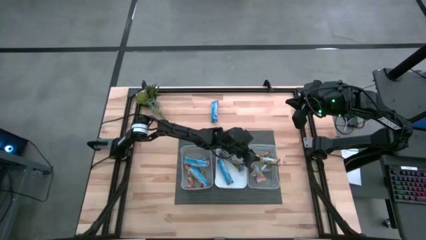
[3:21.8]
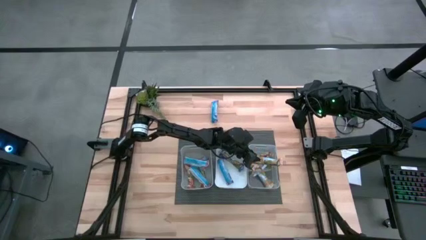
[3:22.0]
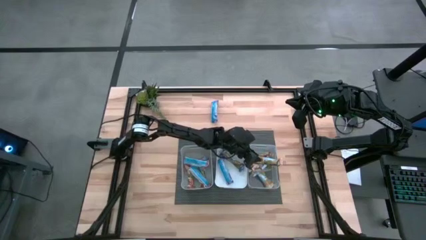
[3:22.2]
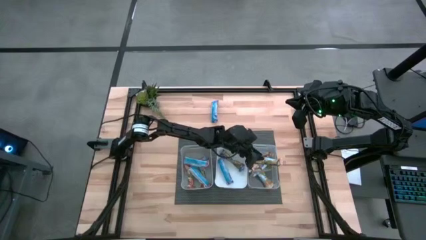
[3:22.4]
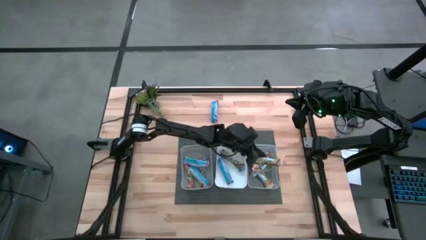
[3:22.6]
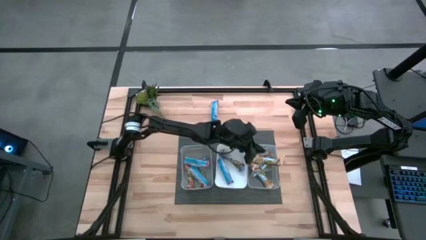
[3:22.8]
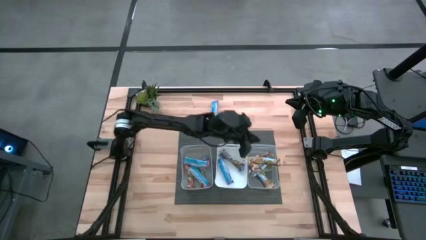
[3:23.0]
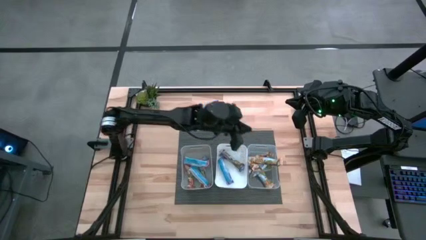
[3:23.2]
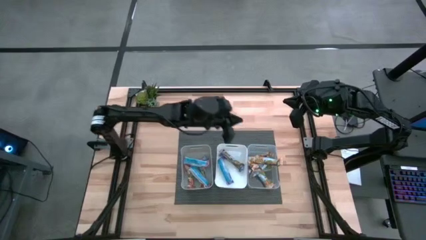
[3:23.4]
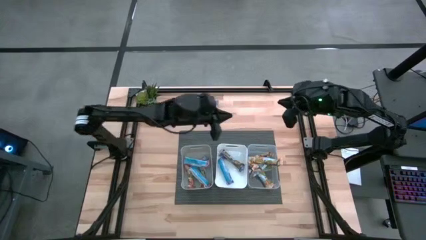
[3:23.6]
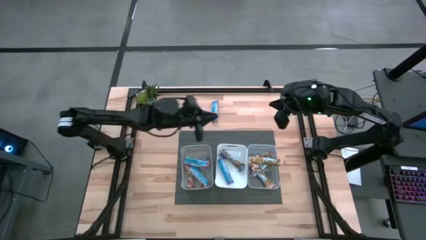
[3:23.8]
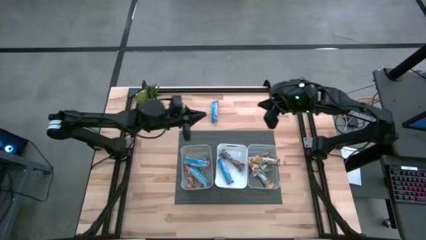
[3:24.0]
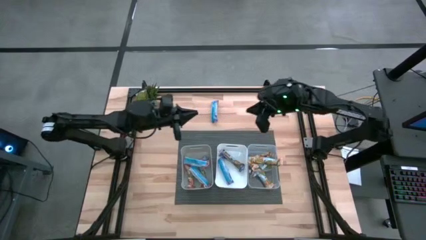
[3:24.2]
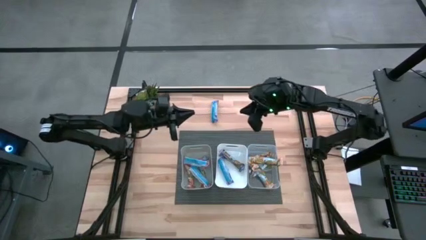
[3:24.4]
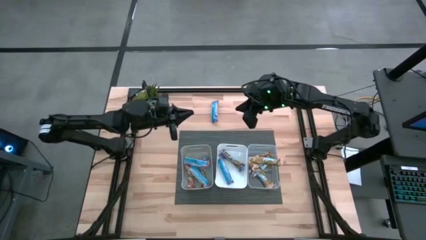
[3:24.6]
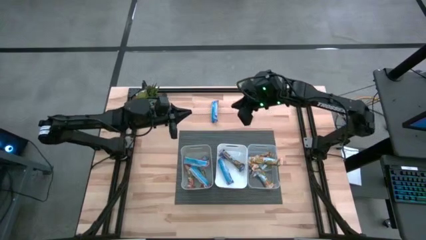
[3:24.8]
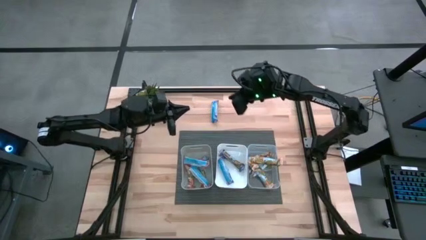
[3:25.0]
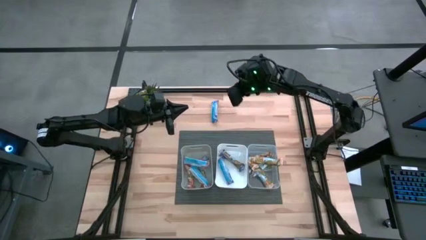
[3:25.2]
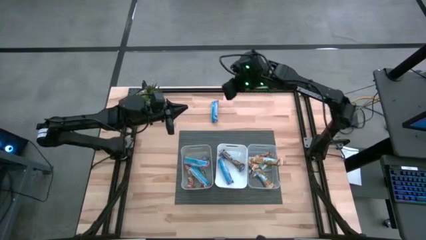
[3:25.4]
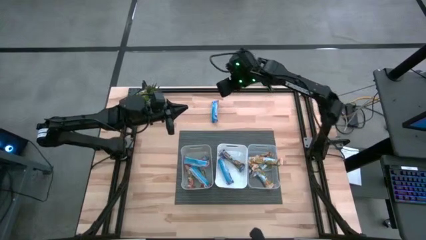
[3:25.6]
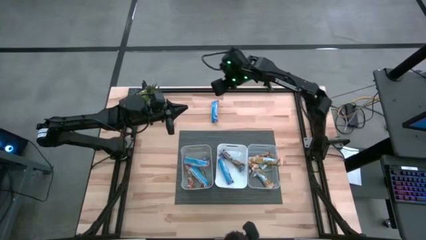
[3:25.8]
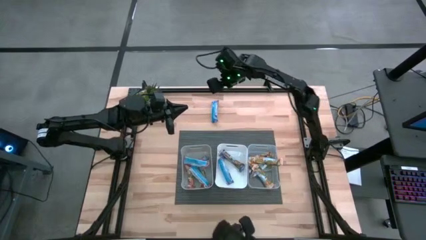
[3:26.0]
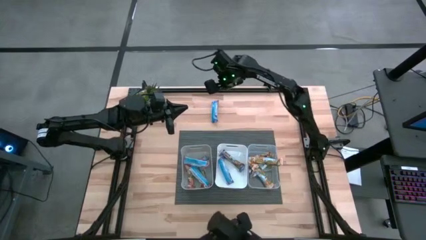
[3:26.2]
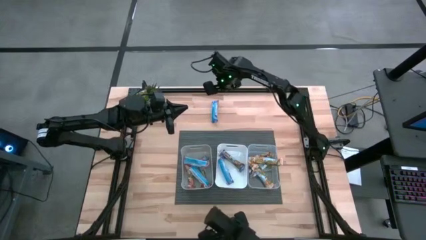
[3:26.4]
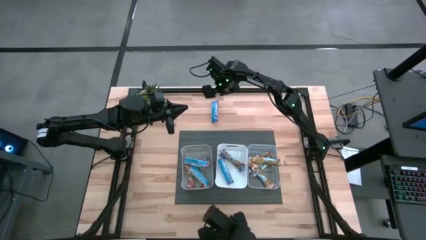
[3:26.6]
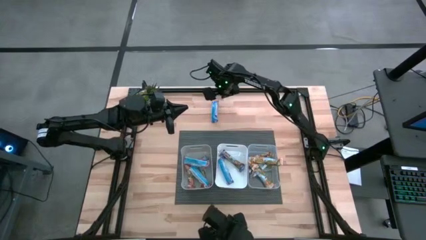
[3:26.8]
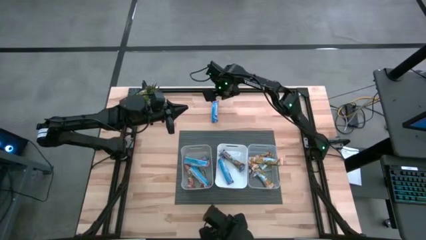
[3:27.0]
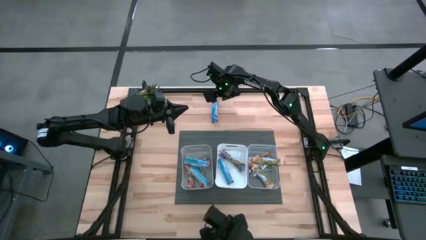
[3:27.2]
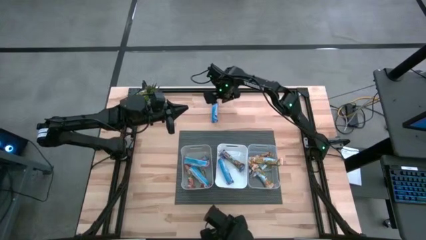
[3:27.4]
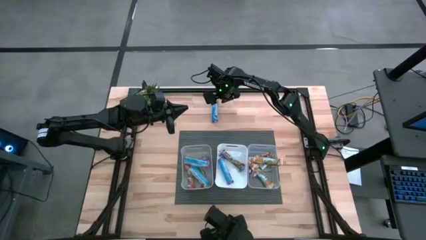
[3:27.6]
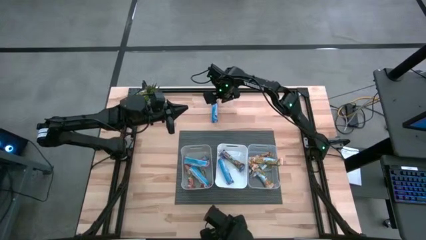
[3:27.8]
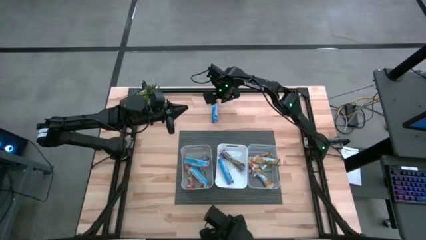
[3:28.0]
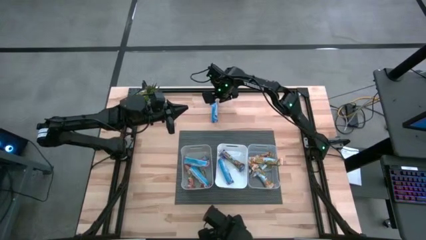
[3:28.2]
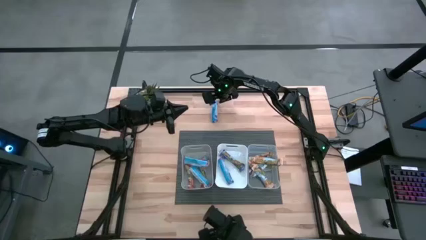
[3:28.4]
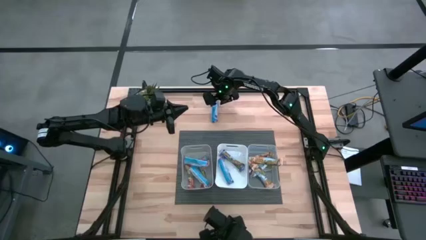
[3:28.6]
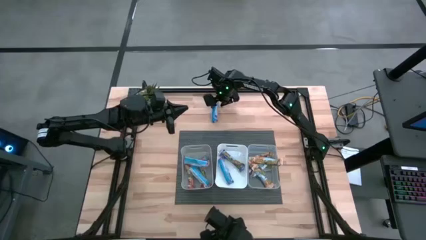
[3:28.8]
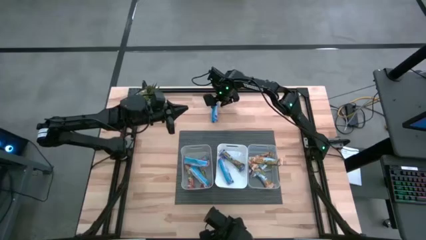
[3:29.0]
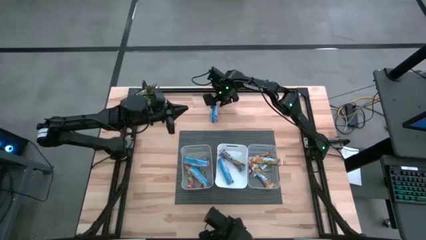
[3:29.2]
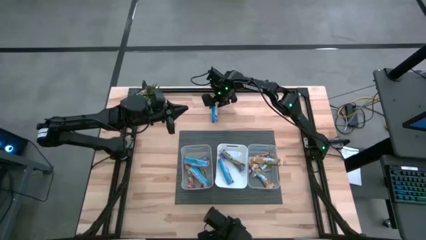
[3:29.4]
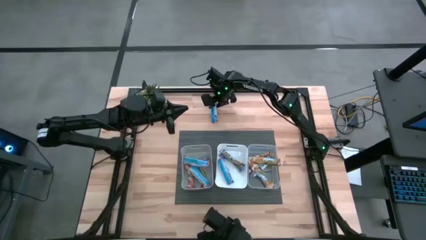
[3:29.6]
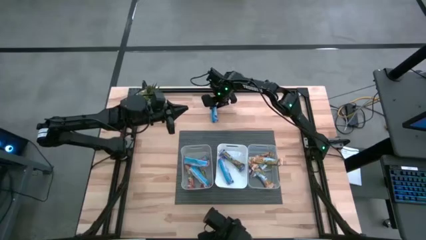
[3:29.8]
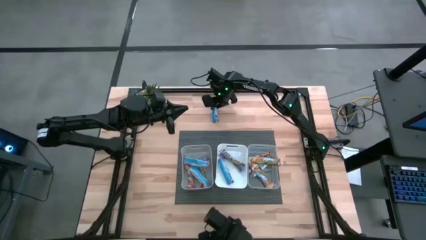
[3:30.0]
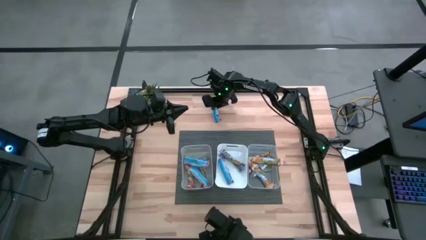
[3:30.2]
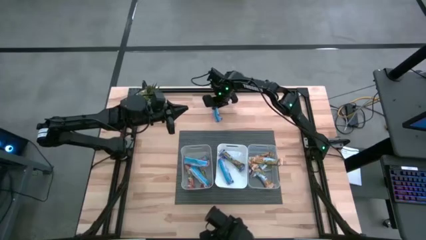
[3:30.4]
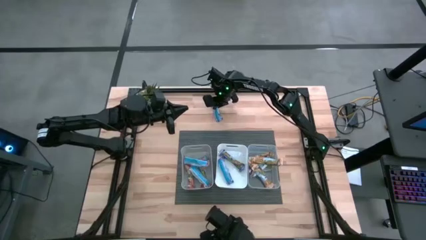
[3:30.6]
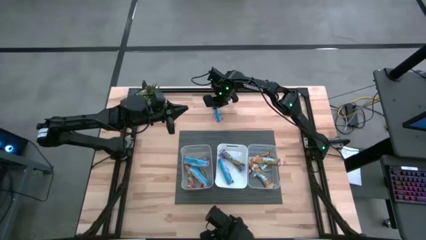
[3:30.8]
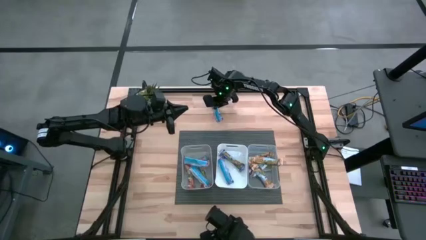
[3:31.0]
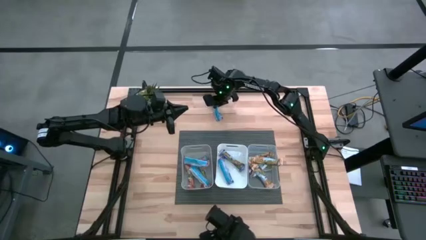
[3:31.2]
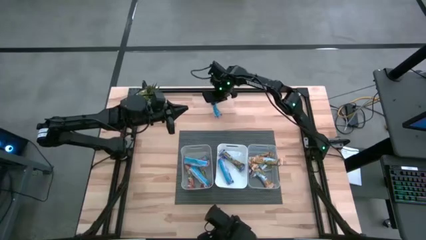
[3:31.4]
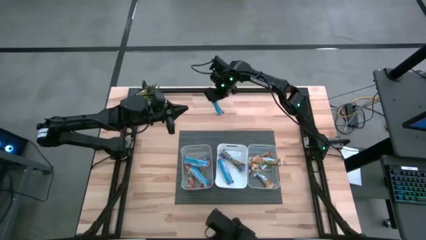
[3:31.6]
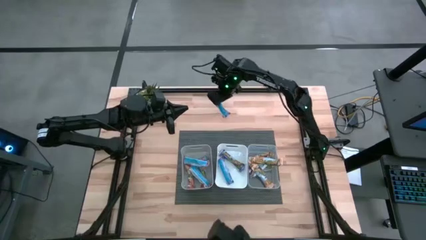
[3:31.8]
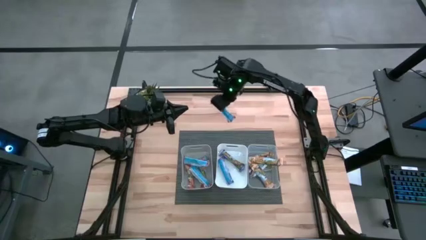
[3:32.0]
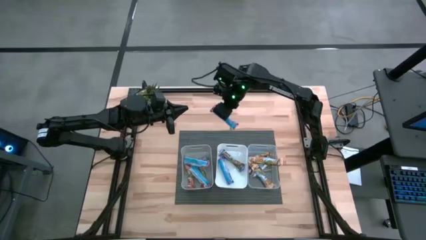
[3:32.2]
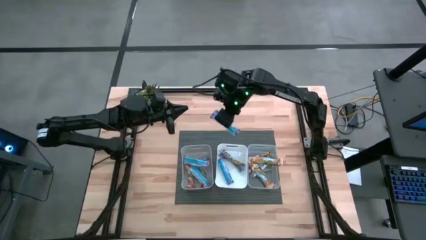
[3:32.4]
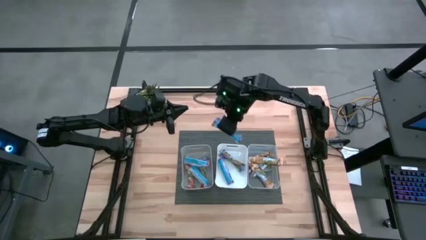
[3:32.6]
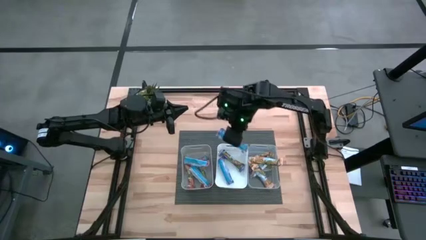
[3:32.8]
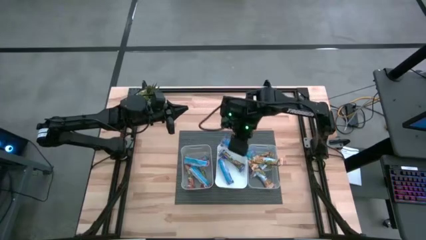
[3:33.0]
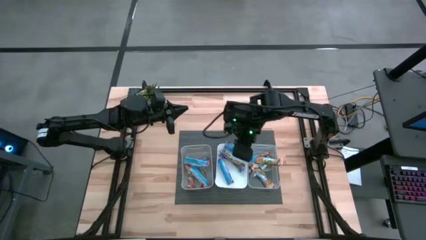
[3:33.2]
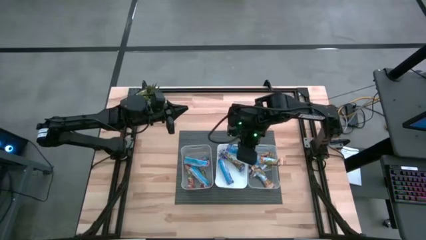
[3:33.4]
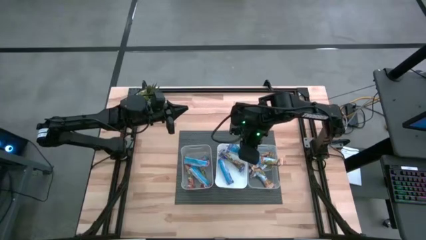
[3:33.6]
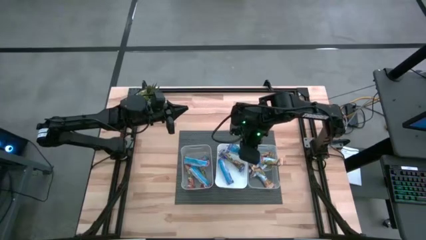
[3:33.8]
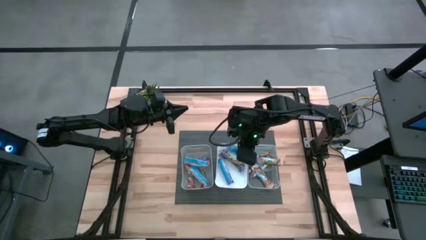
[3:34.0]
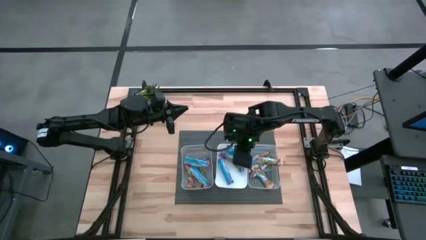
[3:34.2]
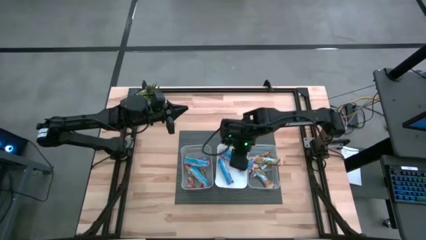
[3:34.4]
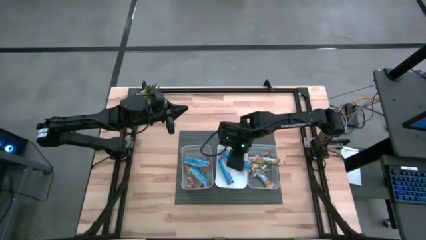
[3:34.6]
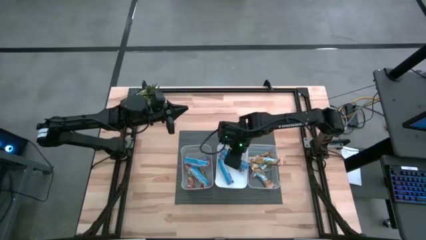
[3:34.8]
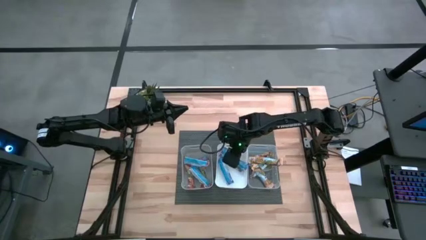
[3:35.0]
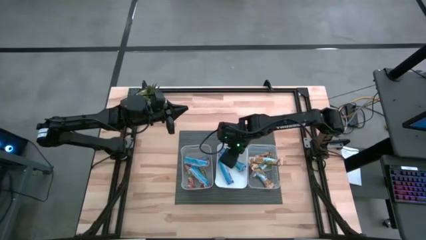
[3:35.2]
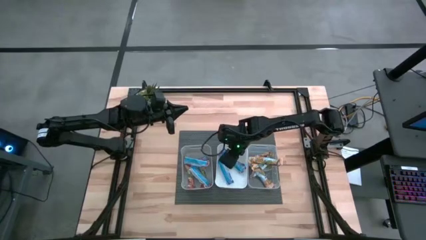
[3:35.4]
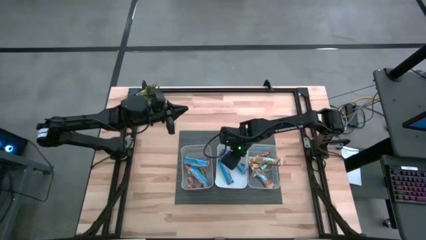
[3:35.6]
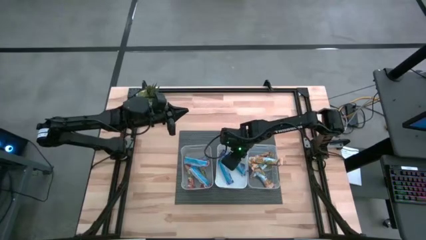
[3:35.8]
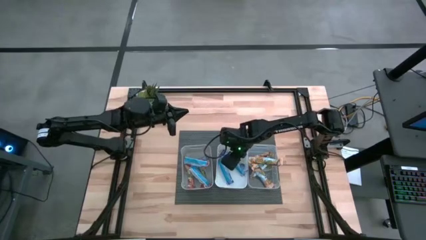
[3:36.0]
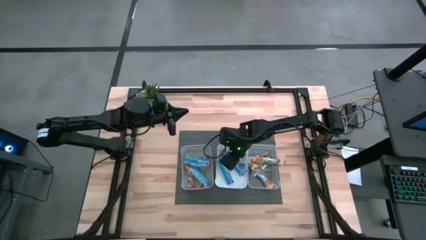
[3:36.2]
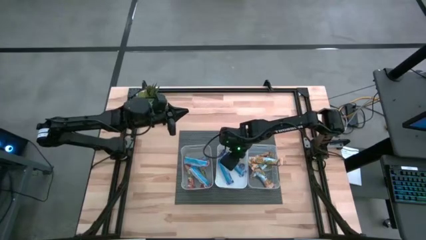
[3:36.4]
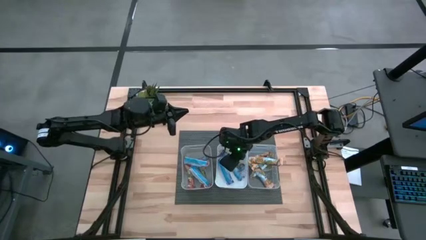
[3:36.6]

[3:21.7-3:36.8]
Task: Pick and place Granola Bars by type
Put the blue granola bar into the white bin

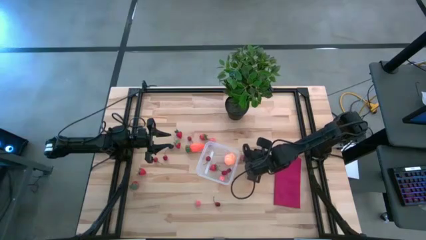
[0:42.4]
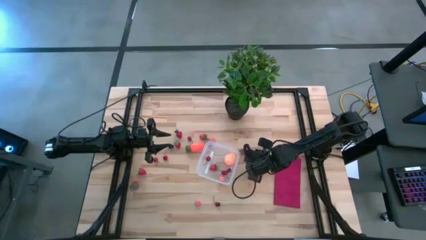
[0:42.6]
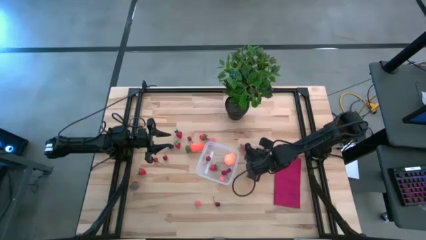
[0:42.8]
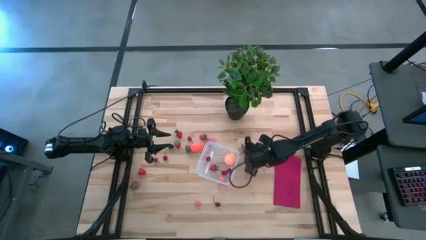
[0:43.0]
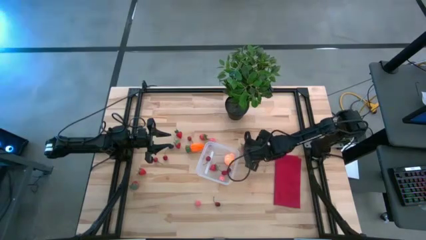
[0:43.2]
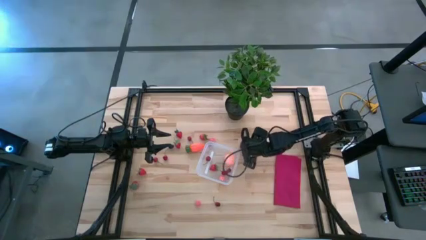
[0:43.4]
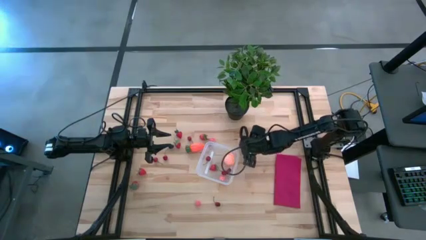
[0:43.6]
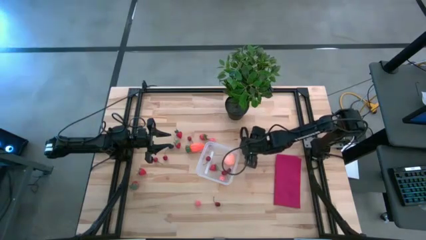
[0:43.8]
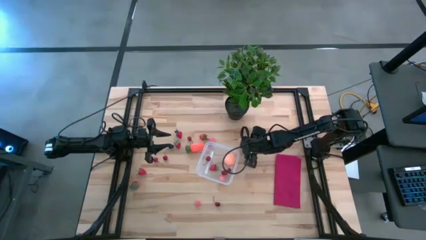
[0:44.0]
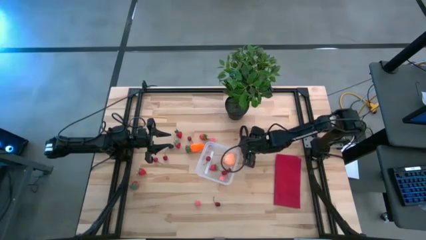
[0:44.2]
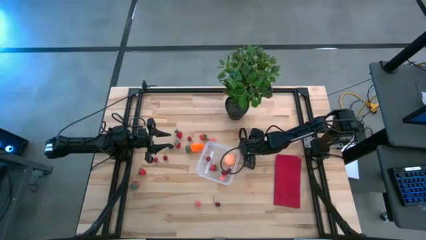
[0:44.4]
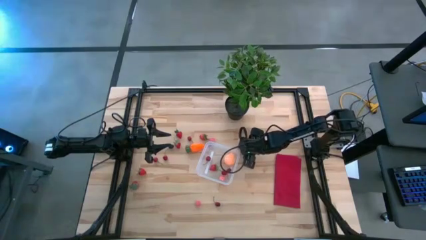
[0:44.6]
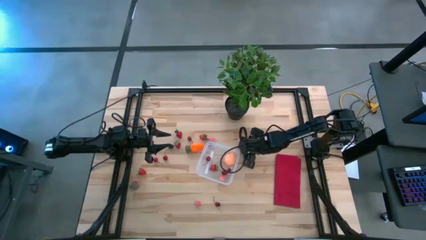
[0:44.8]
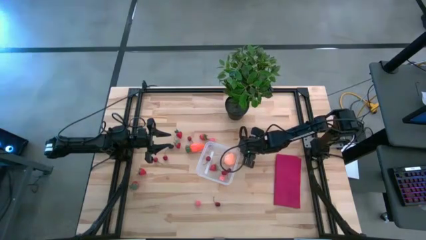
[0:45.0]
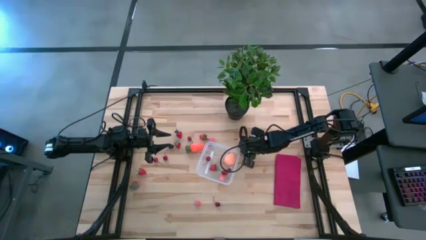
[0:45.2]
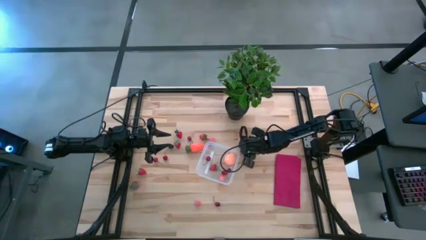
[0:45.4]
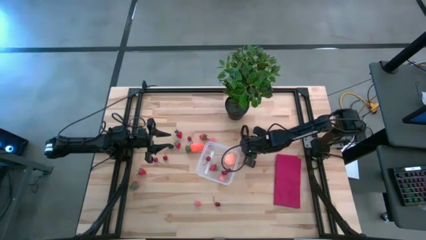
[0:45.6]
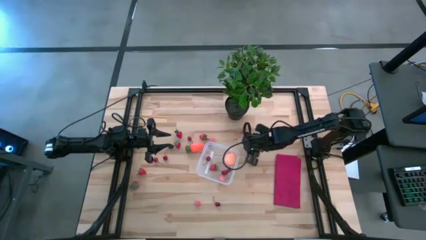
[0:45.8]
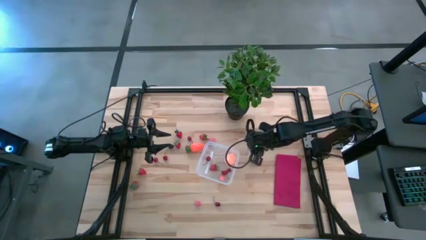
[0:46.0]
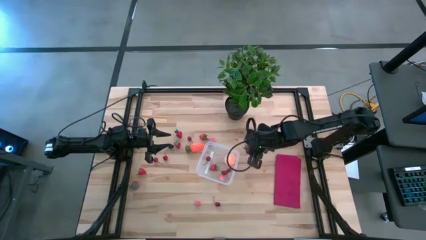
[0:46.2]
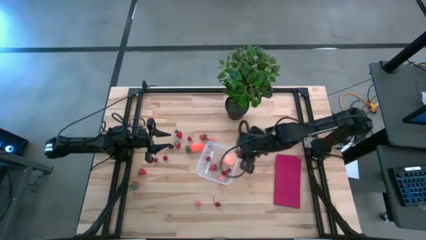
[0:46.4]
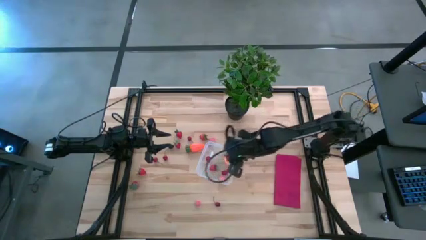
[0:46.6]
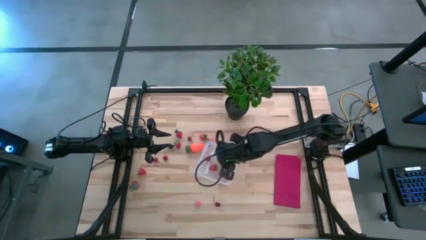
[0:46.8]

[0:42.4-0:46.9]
Task: Pick and placing Produce into tupperware
Put the red strawberry into the transparent bin
